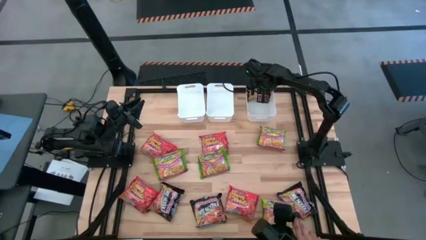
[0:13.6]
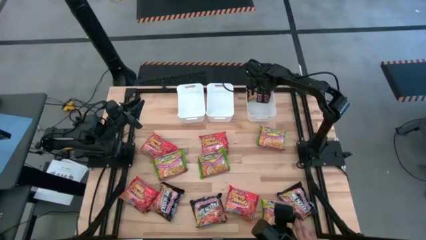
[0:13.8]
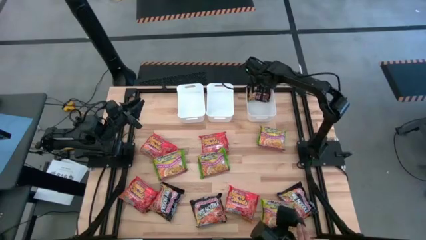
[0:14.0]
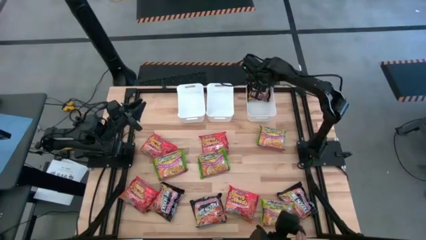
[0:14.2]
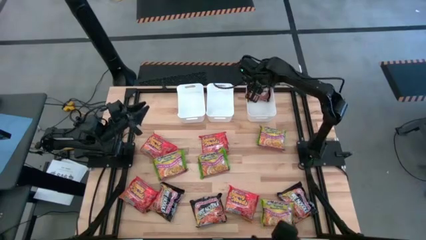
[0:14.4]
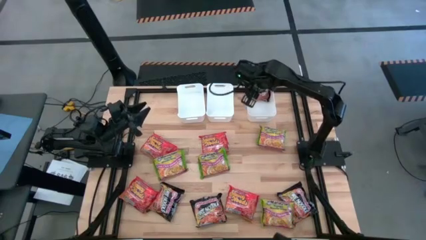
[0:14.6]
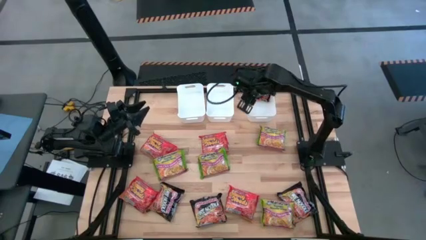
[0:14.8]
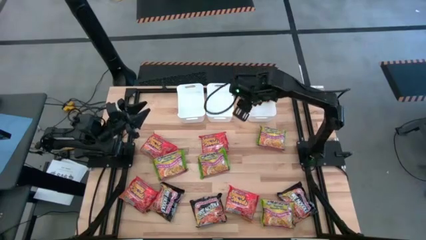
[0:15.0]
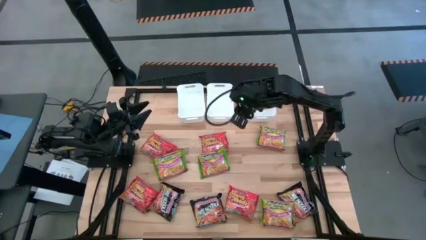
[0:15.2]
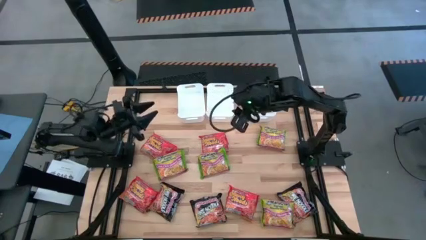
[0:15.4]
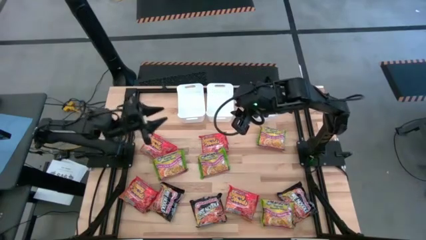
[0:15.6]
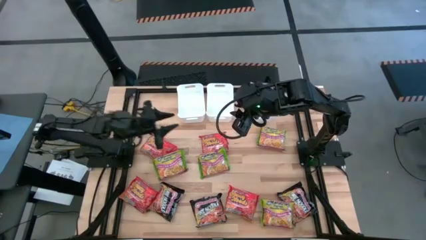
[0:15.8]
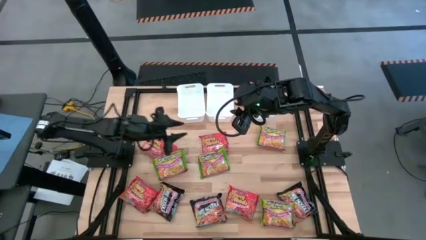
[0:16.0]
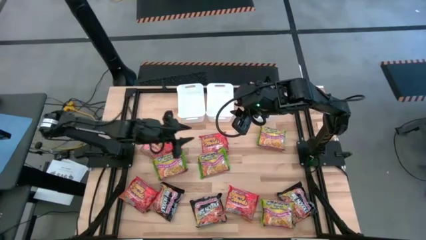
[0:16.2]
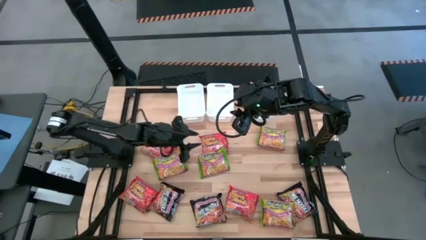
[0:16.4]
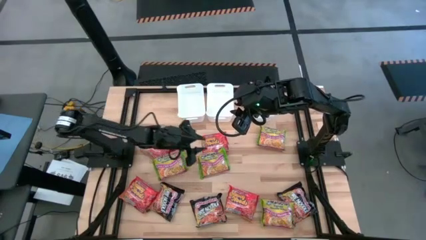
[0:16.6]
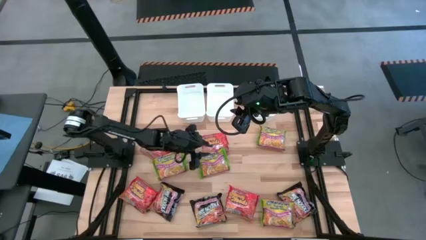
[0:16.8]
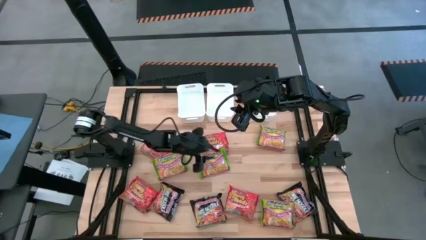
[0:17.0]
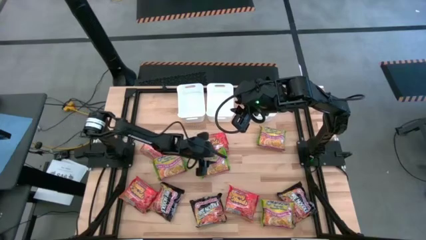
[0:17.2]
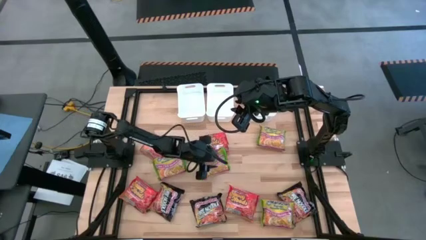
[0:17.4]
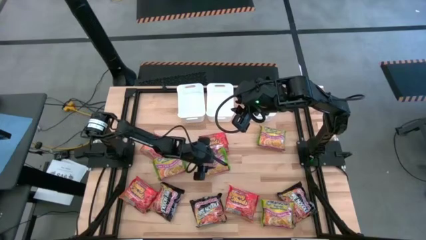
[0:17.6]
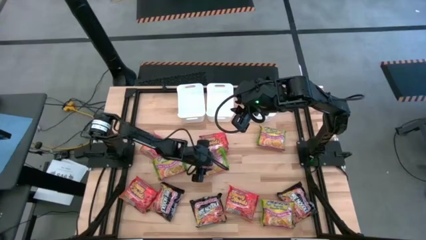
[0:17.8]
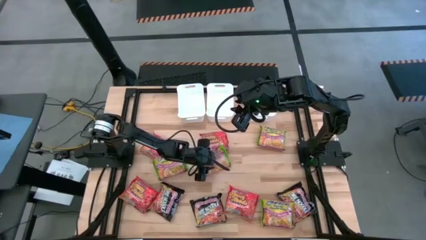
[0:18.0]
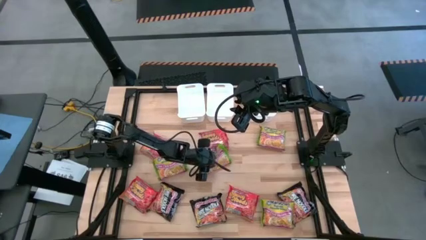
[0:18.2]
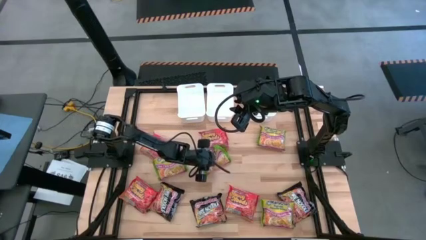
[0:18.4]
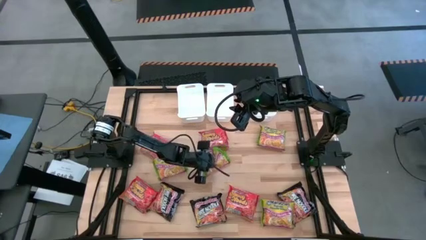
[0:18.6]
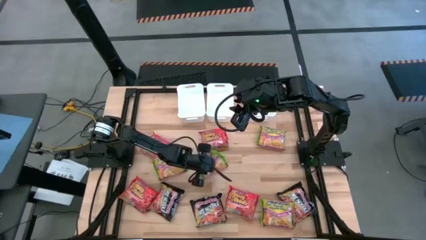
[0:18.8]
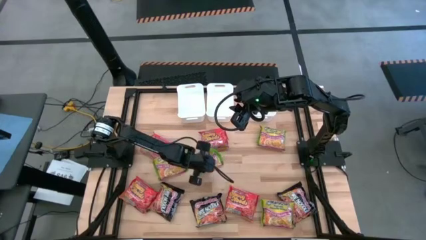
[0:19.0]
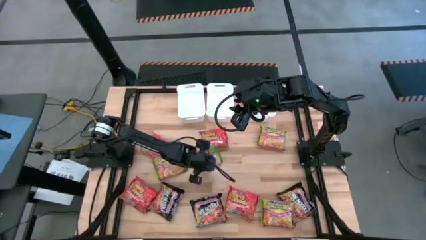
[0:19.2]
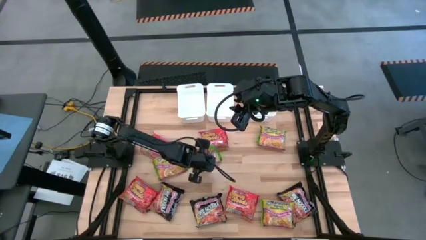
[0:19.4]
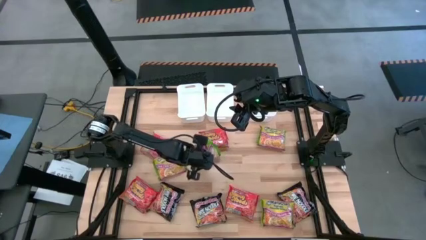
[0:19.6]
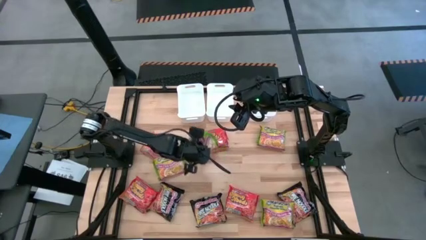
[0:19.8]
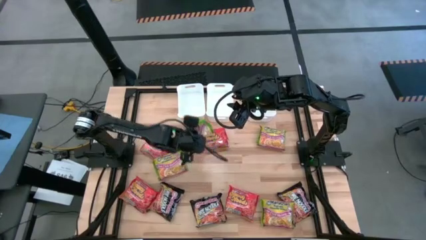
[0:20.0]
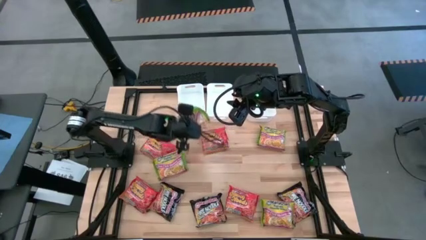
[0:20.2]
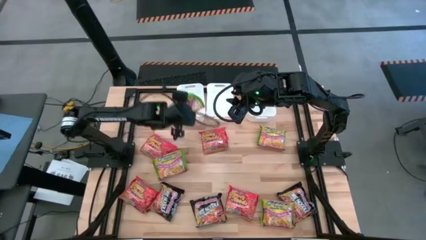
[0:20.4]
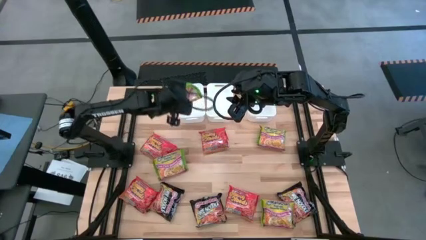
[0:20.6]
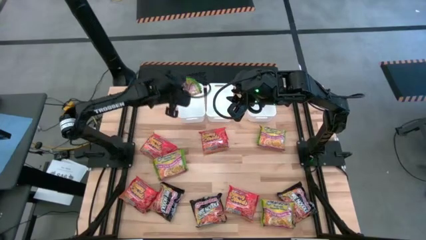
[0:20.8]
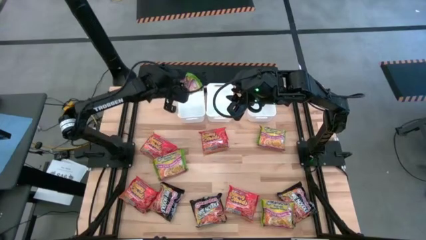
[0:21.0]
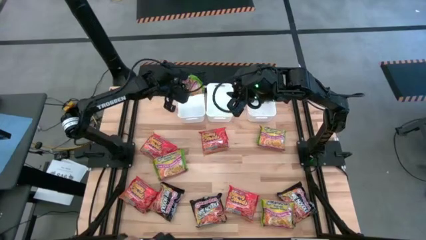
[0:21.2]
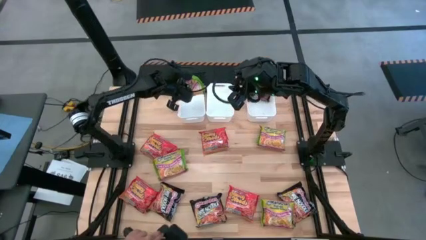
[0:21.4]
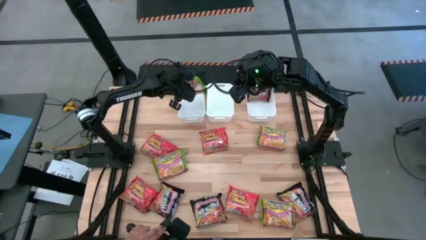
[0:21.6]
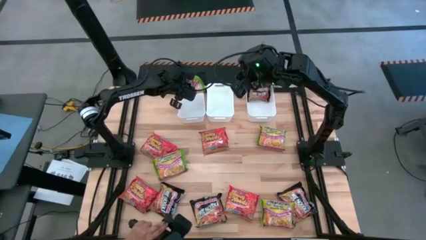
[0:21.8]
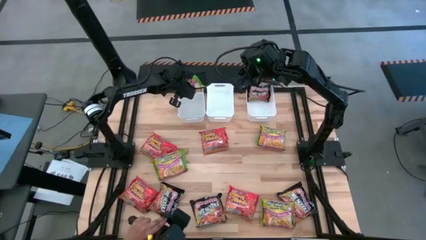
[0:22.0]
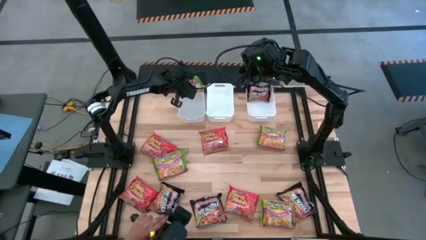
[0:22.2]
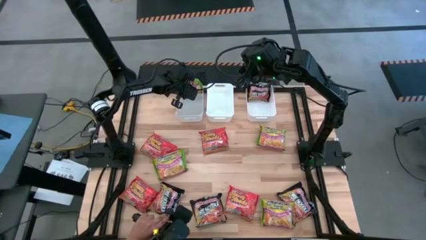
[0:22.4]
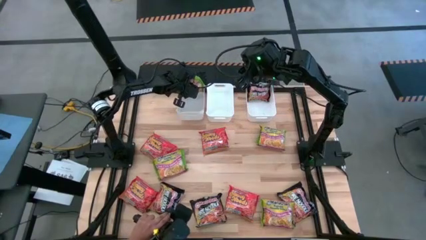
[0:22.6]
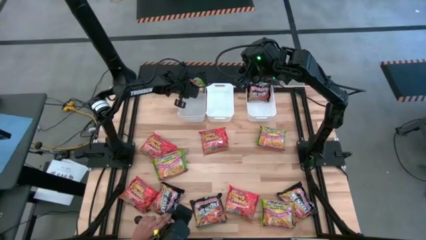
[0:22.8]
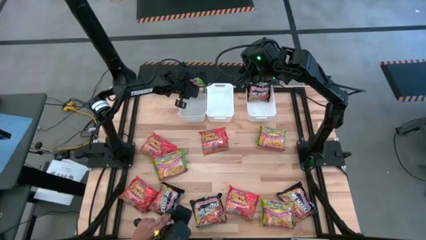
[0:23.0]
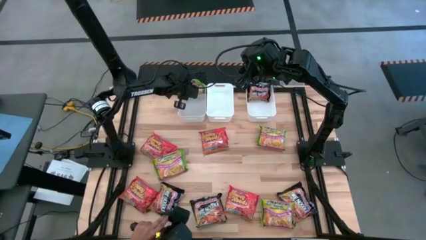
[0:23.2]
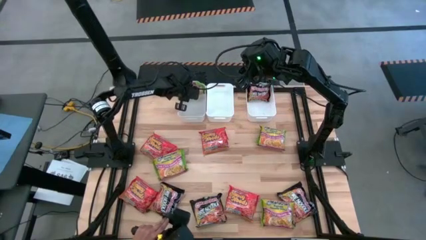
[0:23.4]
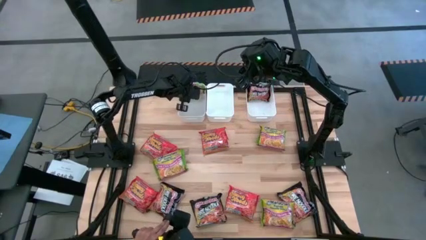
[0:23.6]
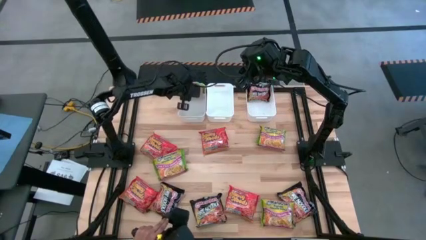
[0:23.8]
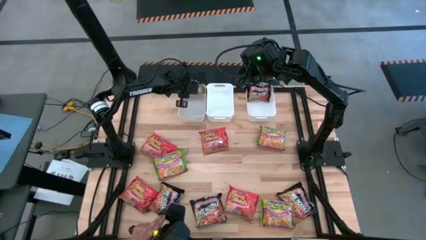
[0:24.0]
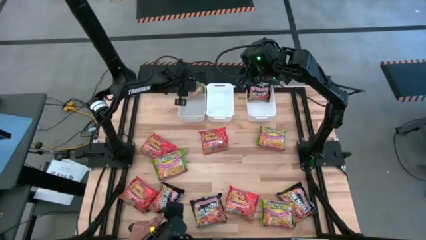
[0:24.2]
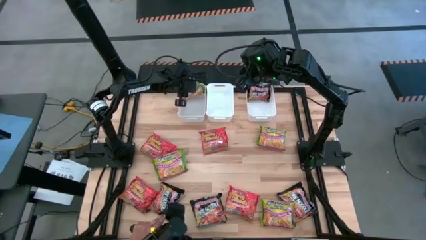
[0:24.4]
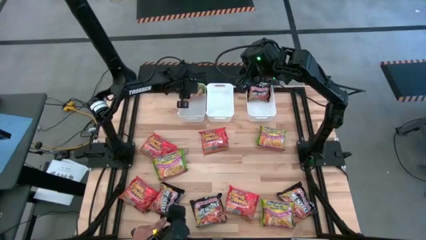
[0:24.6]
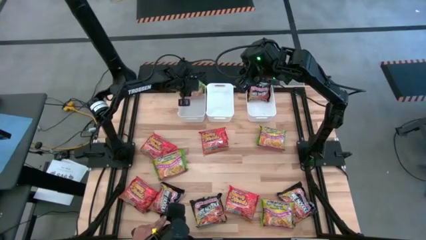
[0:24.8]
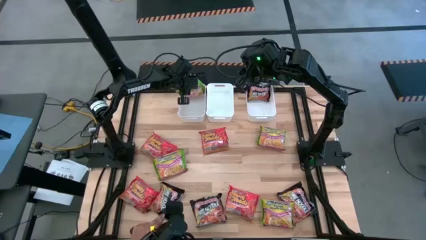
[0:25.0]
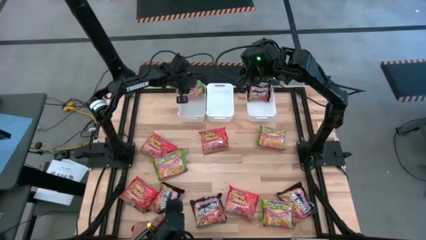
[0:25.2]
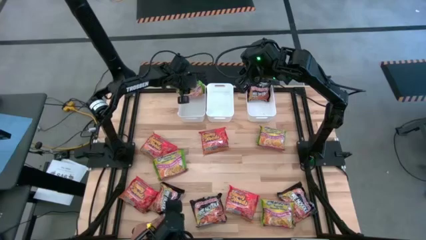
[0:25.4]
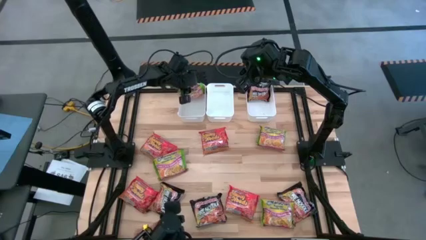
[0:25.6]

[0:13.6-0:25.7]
Task: Sort Maruchan noodles
Put the green noodle pack into the left white bin

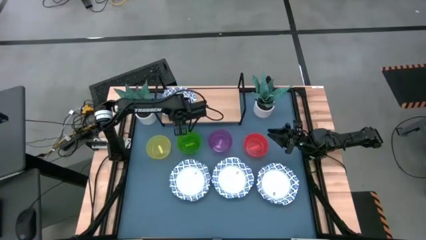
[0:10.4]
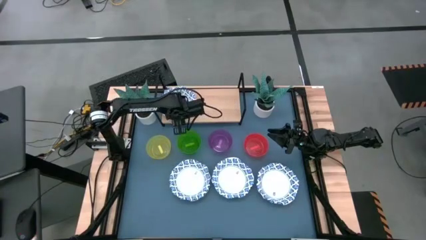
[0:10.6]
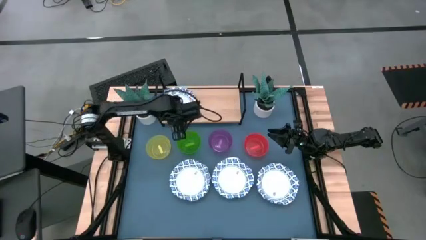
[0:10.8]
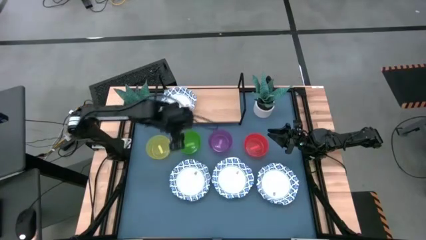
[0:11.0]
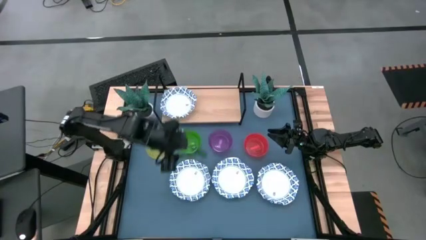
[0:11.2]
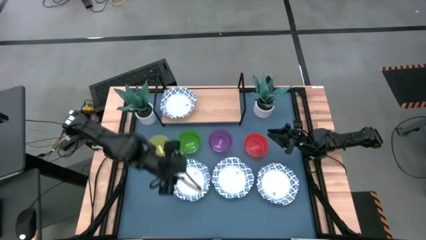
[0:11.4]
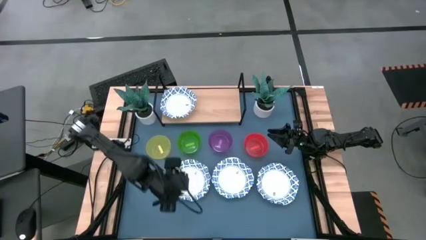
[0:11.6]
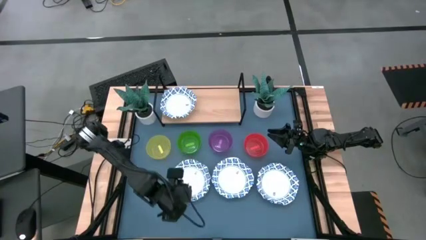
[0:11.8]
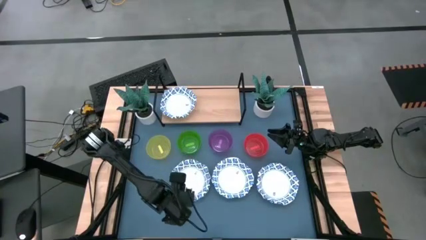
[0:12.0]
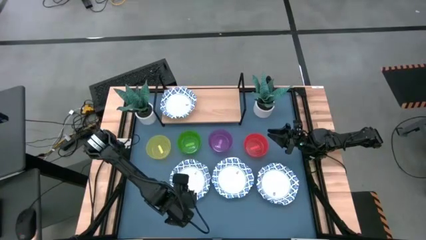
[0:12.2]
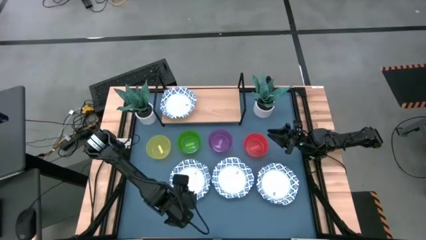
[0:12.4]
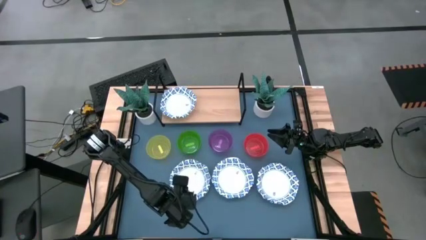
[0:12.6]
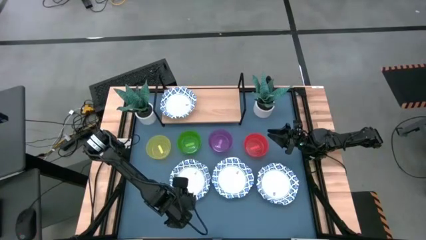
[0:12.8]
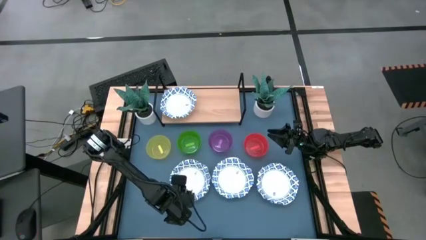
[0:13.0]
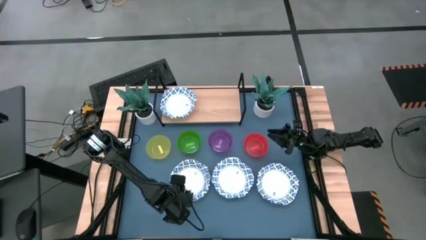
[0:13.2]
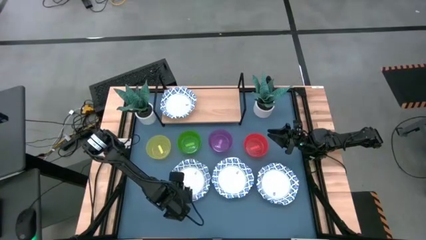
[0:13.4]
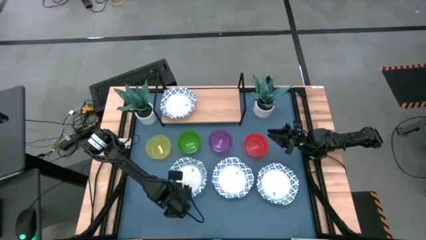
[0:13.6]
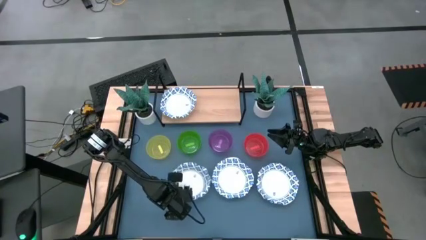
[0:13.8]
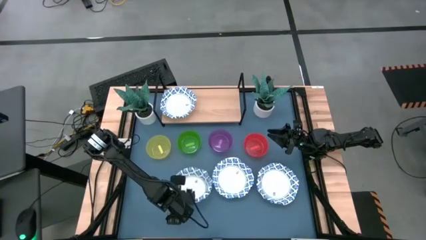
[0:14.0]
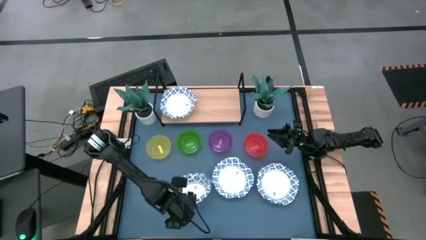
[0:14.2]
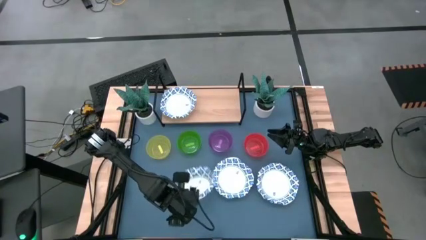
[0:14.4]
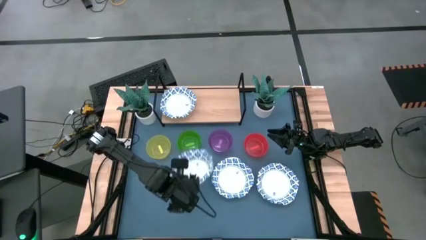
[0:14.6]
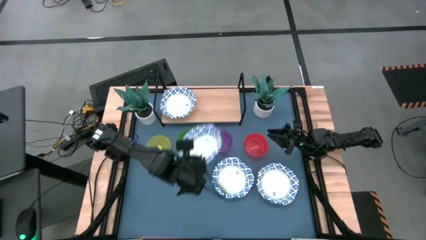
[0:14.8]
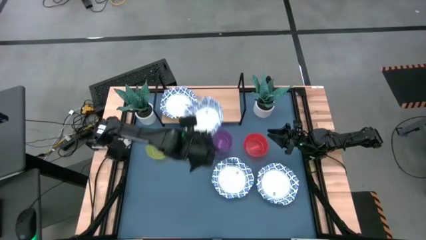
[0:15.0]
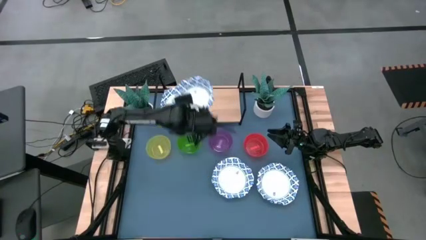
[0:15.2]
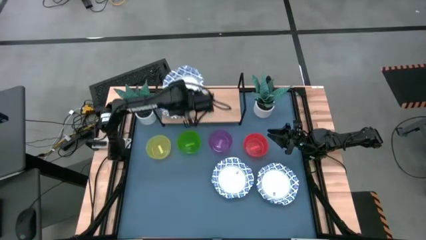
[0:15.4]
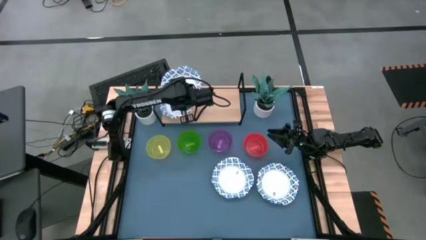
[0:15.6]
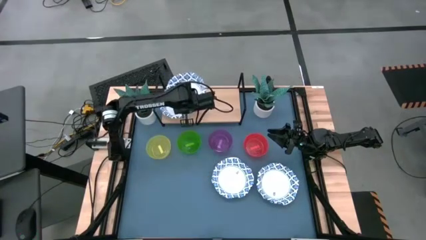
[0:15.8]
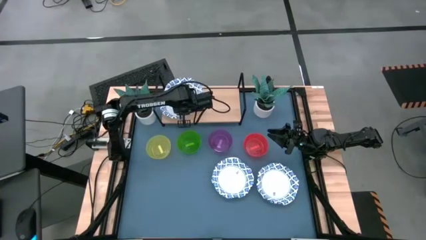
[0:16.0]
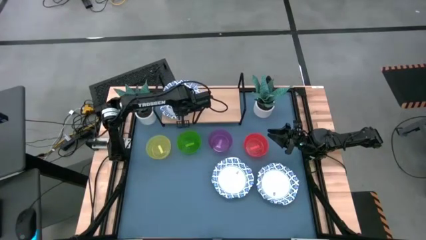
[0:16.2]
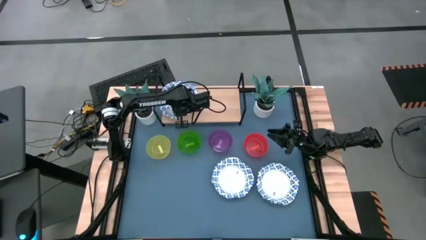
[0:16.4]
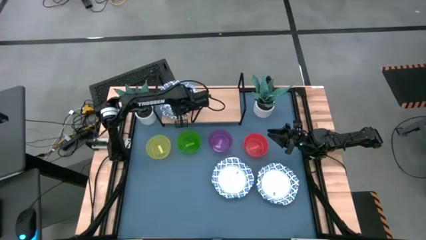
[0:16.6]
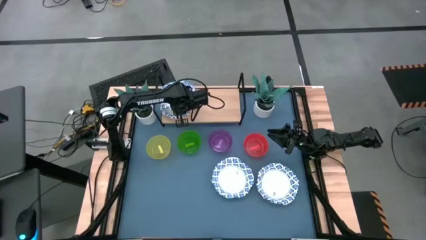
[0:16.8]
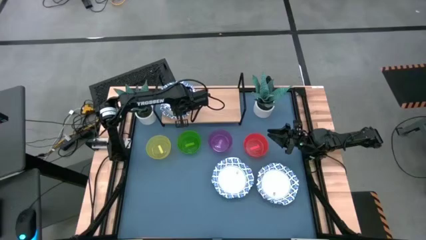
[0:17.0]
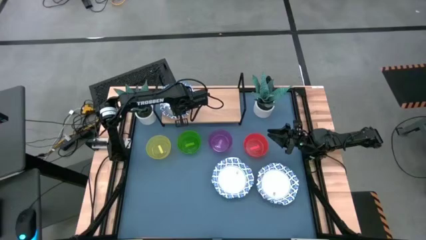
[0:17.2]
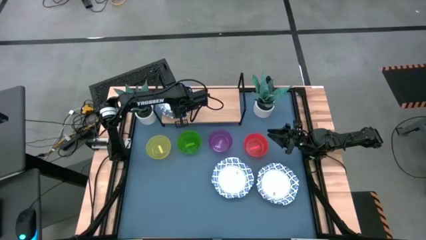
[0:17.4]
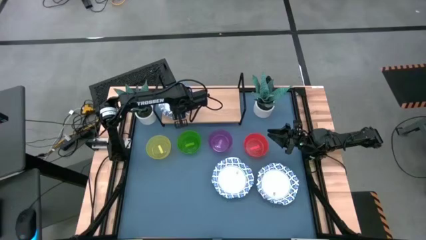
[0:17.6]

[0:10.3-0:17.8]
Task: Place and stack bowls onto a shelf
Stack the paper bowl on the top of the paper bowl on the shelf
